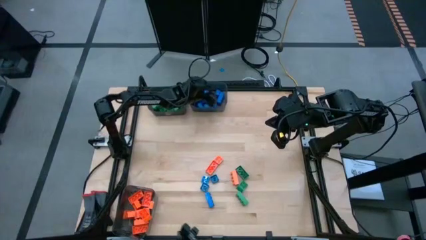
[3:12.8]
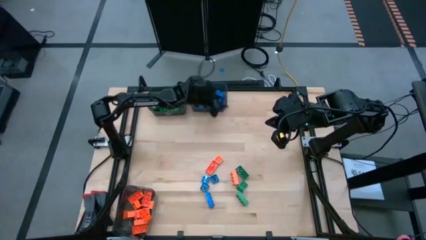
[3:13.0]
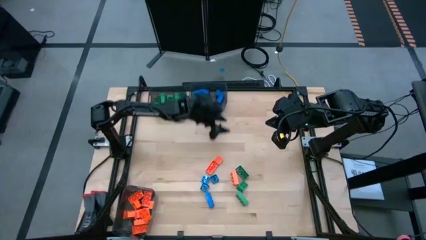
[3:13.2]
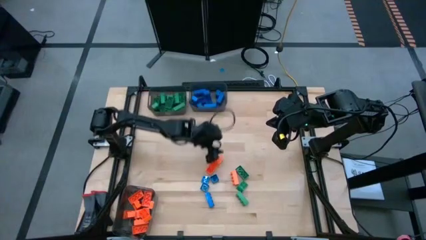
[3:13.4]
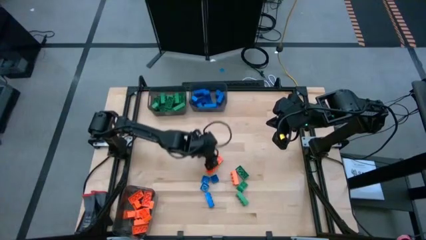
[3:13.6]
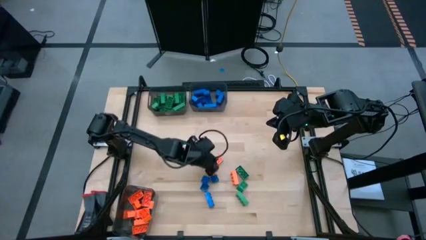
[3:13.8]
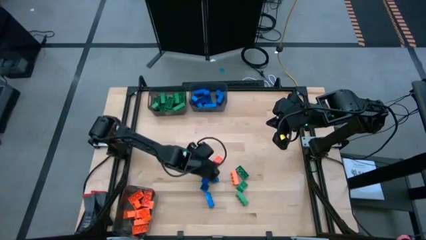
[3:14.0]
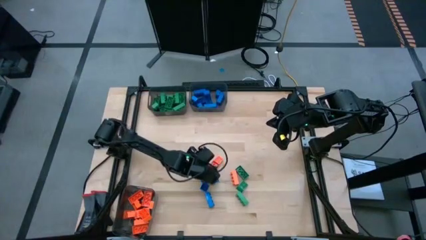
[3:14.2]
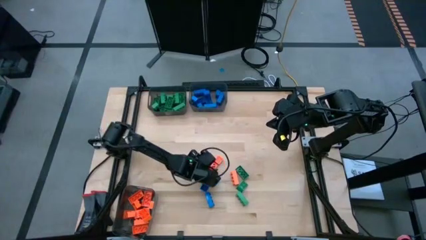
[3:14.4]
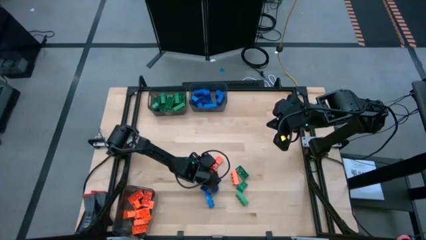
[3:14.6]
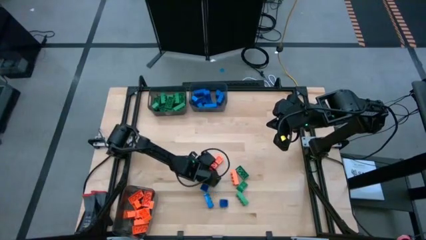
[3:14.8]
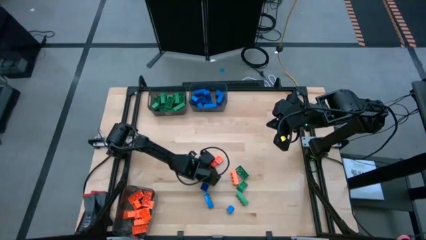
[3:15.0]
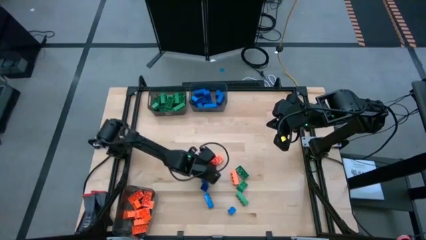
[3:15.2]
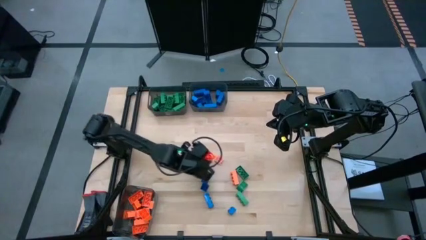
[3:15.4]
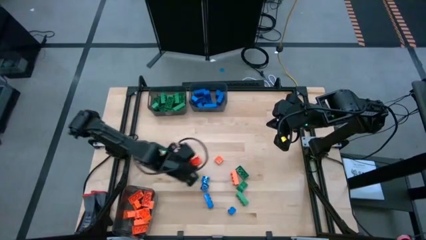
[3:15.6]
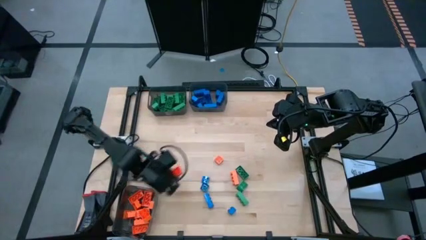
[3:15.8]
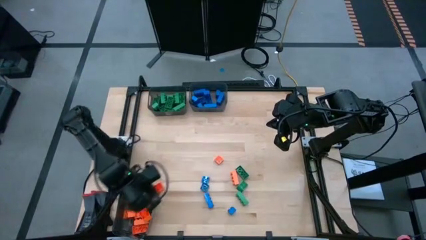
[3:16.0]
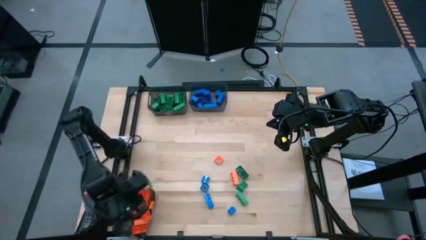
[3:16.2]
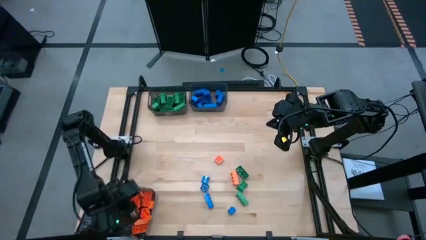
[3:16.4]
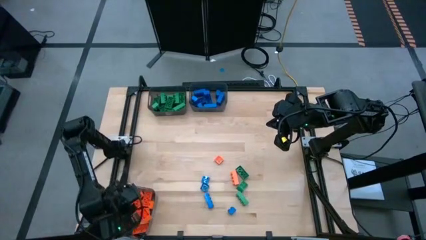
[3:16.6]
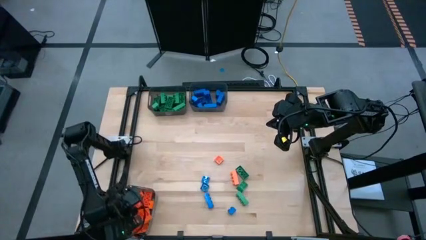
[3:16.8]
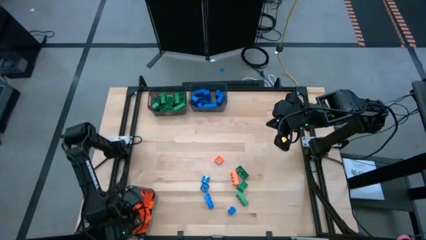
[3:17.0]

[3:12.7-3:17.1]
Task: Sort blocks
Put the orange gamepiece into the bottom black bin

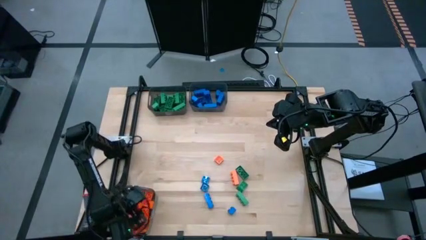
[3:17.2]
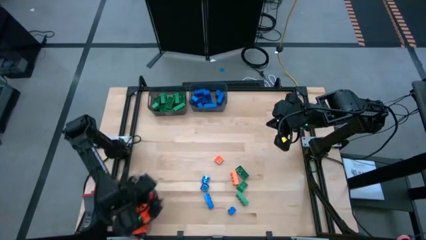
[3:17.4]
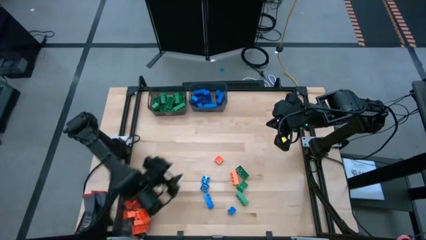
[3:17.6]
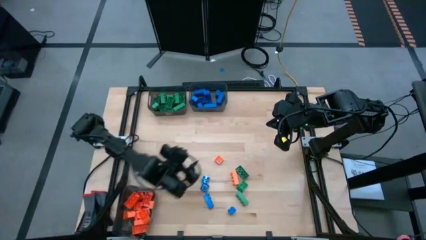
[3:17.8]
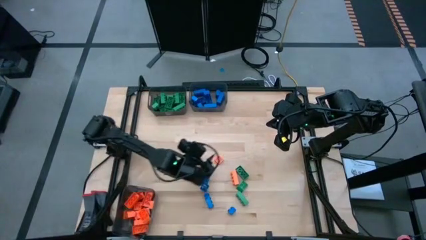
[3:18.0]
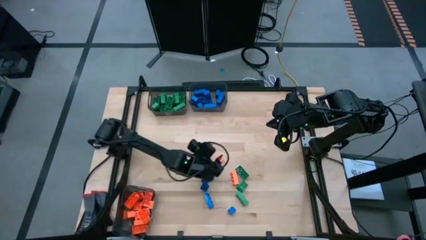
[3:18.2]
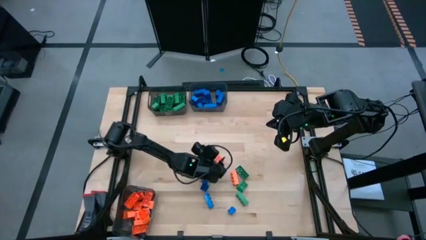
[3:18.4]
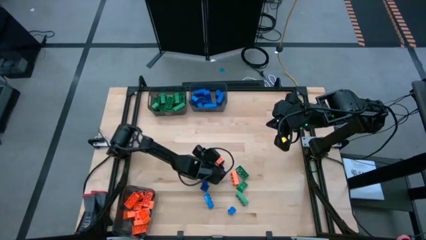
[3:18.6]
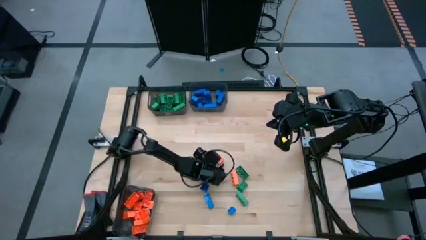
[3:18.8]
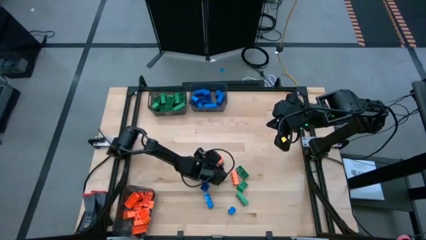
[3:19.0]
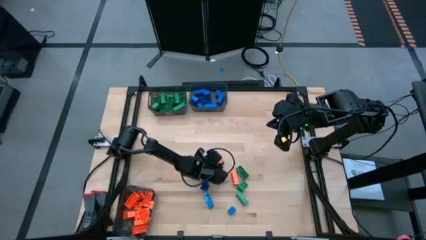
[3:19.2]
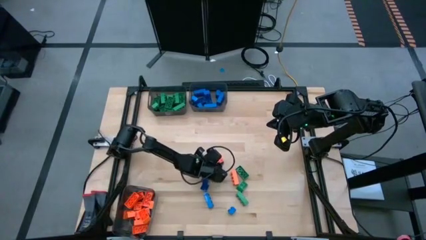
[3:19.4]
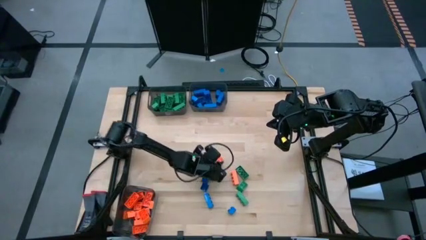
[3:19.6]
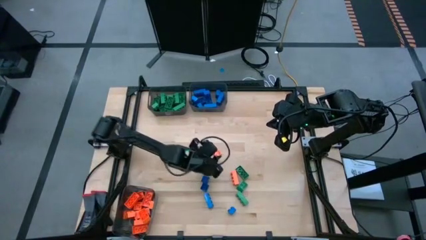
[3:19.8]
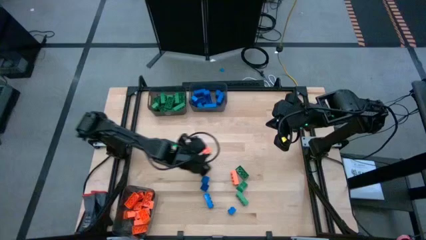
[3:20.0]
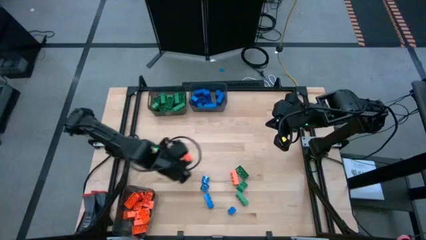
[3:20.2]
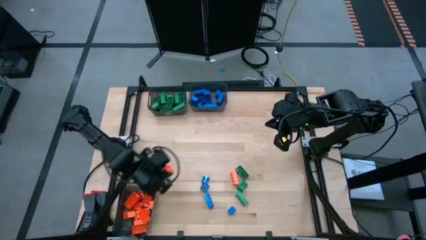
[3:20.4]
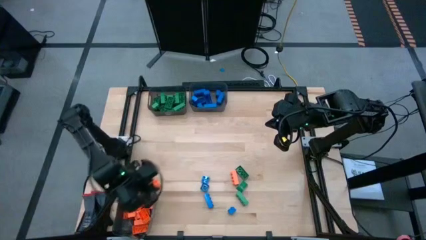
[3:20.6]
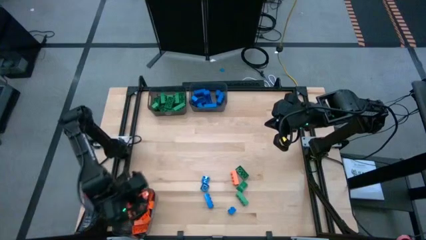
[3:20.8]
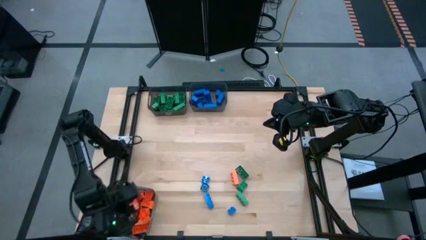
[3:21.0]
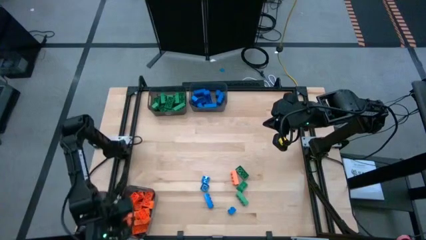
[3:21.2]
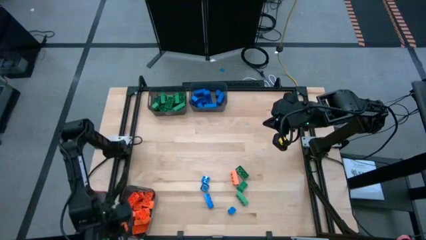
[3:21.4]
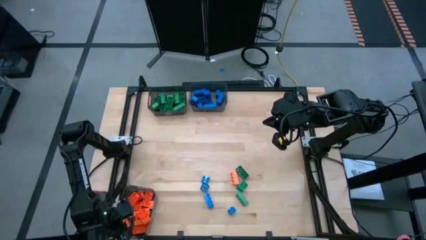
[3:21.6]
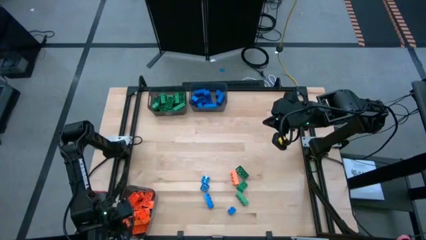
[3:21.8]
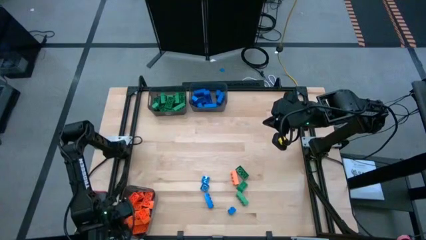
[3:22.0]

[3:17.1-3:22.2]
Put the orange gamepiece into the bottom black bin

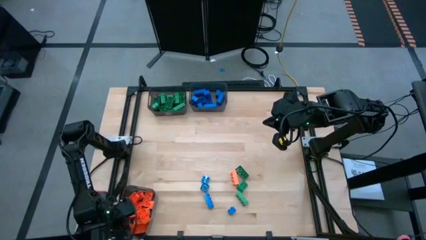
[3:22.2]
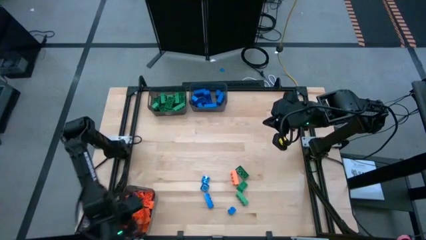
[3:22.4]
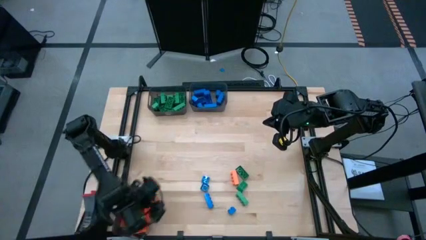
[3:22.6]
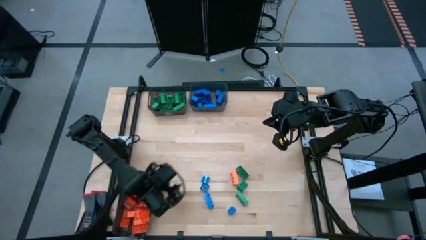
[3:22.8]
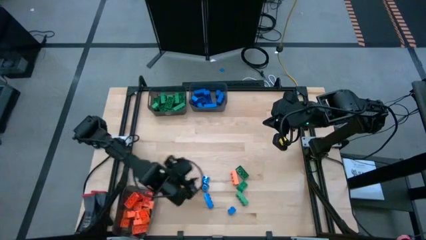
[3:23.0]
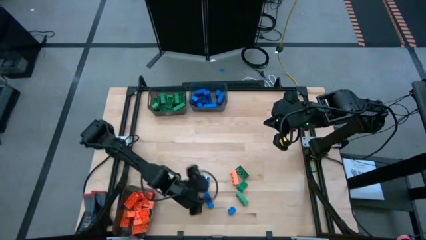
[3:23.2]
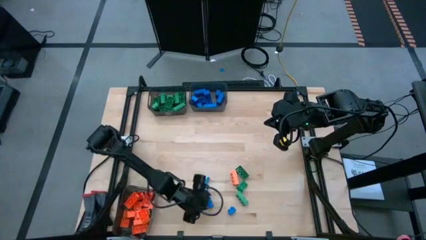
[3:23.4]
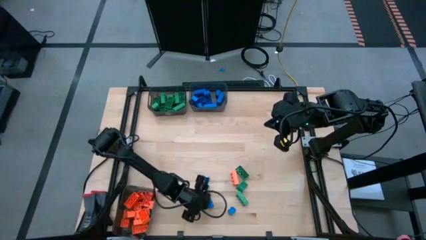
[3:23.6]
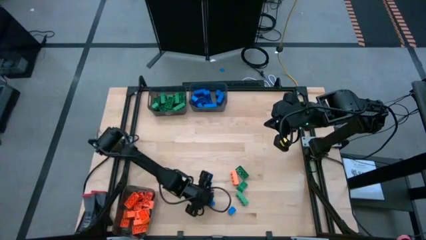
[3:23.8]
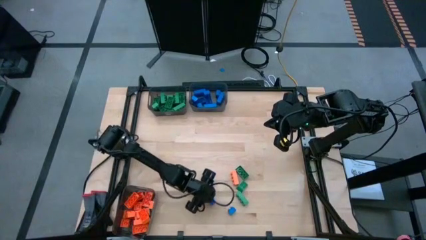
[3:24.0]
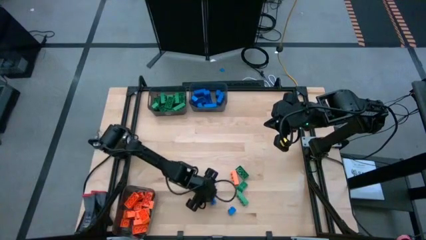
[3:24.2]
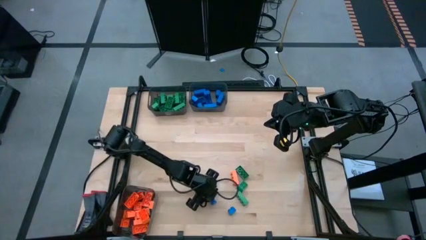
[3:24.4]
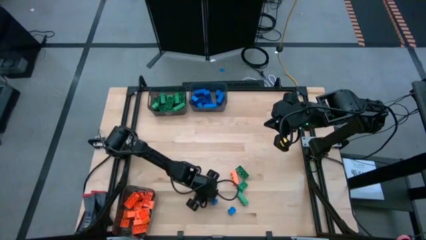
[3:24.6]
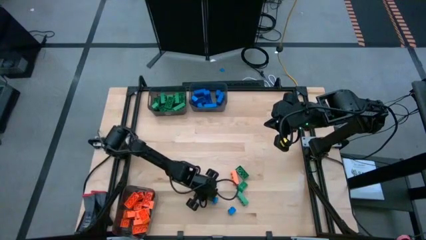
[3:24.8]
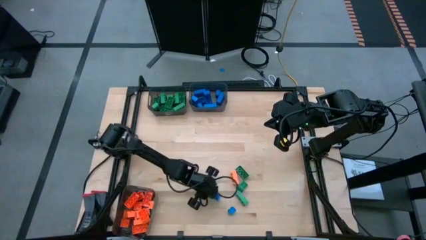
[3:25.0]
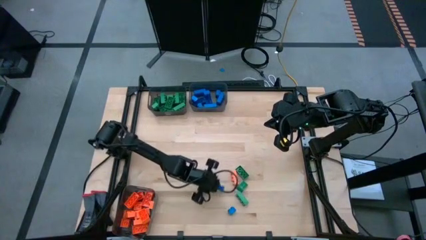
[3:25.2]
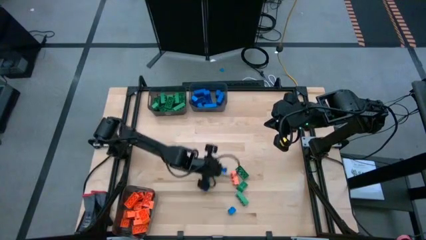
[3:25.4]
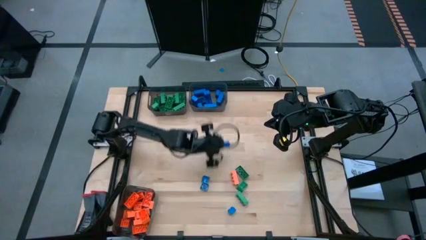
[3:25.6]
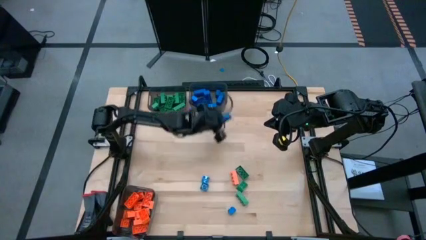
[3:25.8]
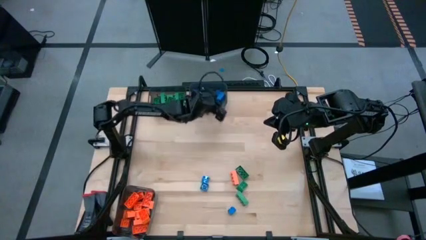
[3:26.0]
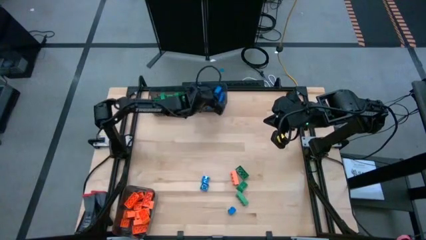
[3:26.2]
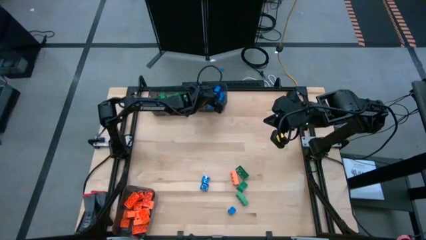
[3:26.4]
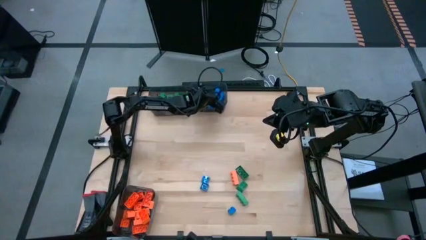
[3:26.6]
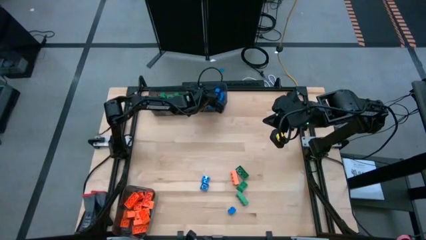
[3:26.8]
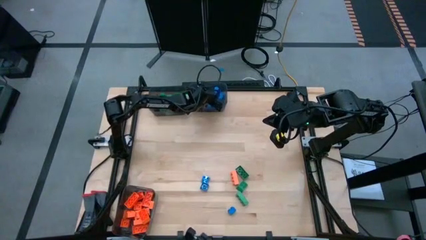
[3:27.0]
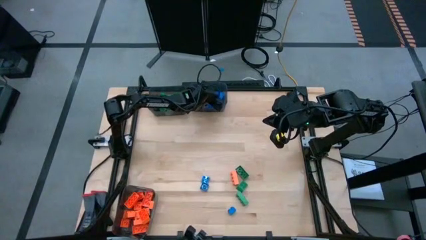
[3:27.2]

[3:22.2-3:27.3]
Put the blue gamepiece into the top right black bin

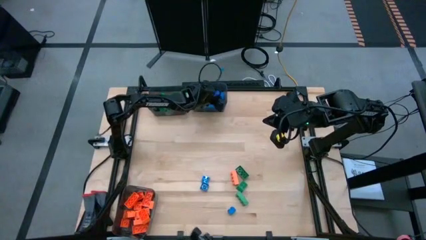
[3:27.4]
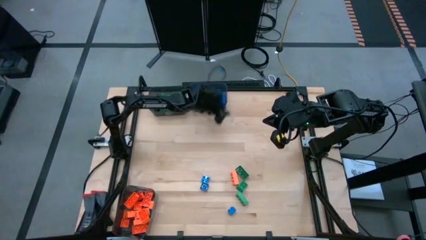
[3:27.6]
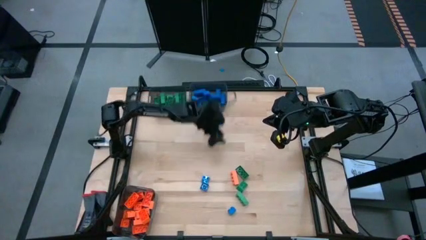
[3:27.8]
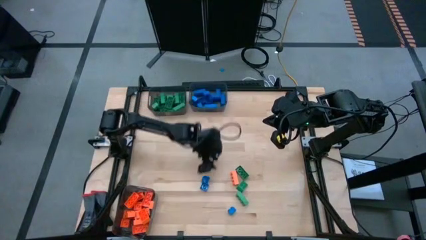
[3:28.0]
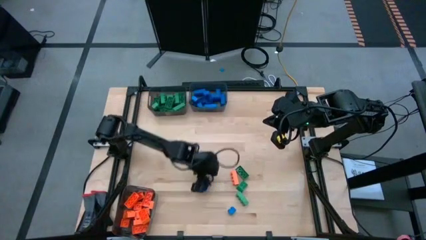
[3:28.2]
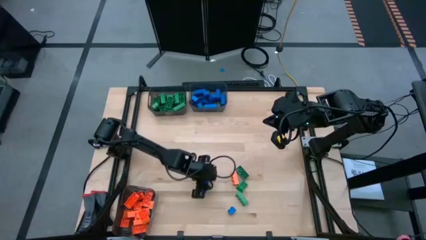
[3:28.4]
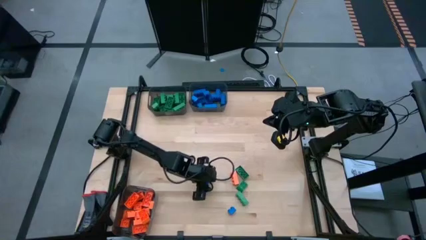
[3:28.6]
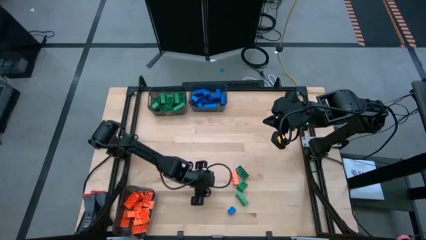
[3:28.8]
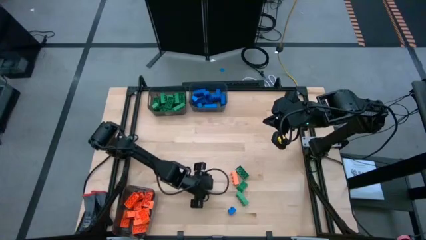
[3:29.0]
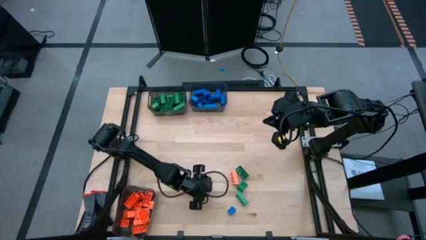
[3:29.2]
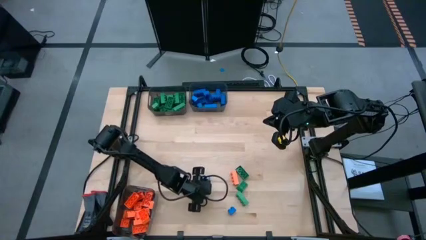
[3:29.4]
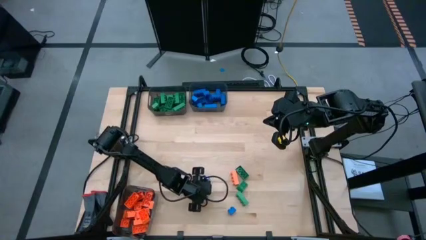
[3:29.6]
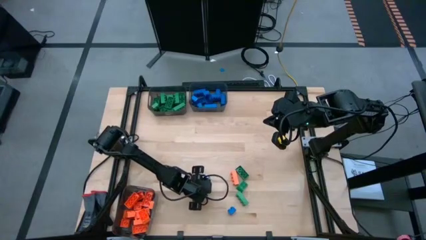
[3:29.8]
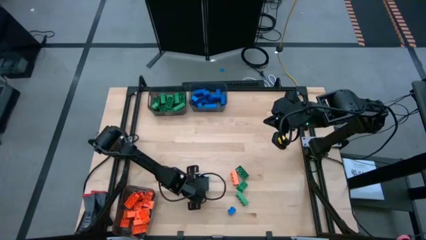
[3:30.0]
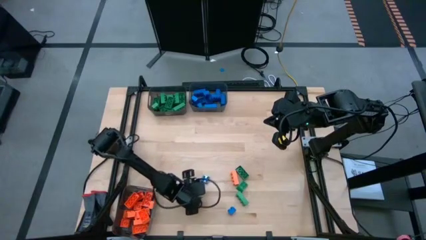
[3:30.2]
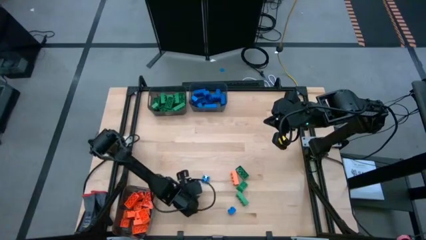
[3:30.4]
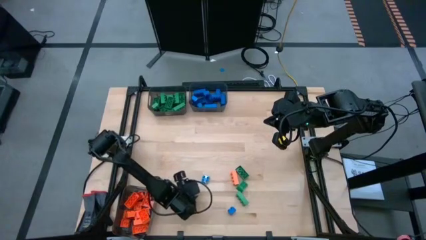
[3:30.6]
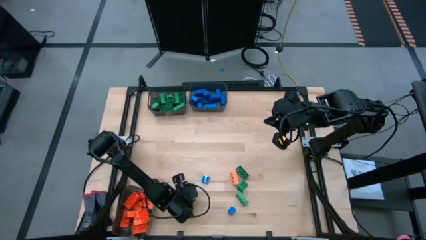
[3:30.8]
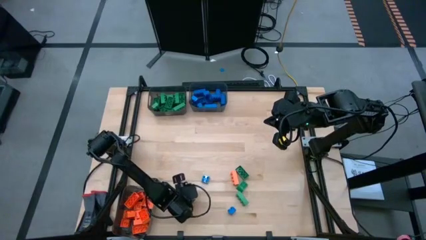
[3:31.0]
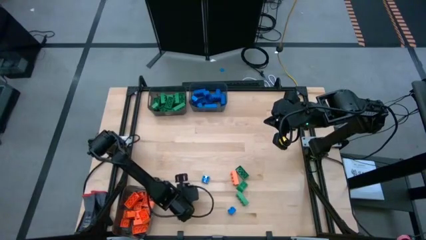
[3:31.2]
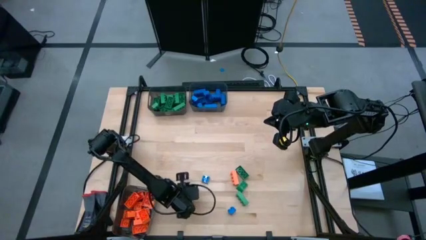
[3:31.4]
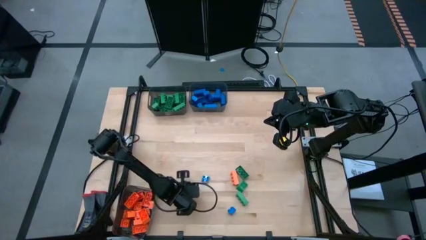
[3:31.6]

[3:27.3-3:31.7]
Put the blue gamepiece into the top right black bin
